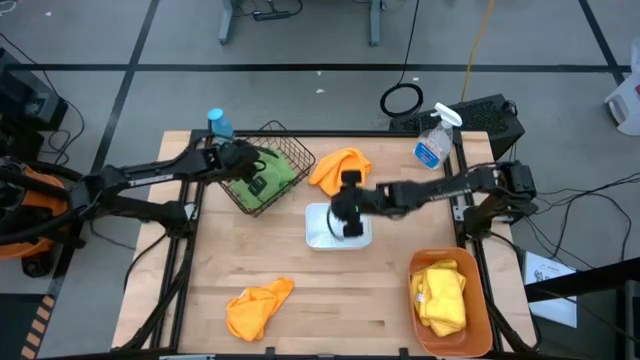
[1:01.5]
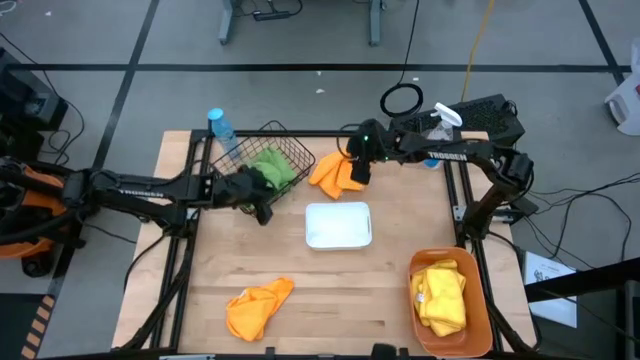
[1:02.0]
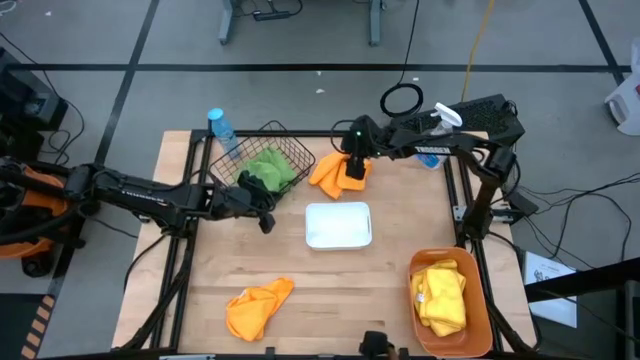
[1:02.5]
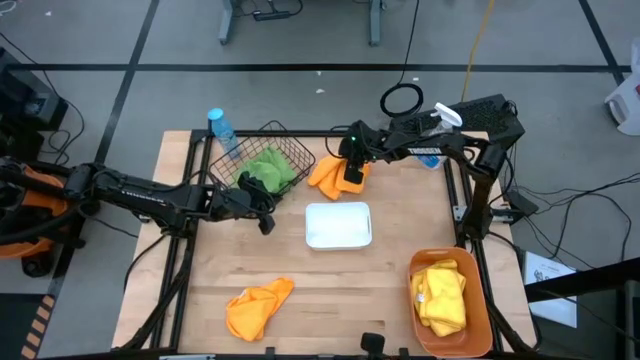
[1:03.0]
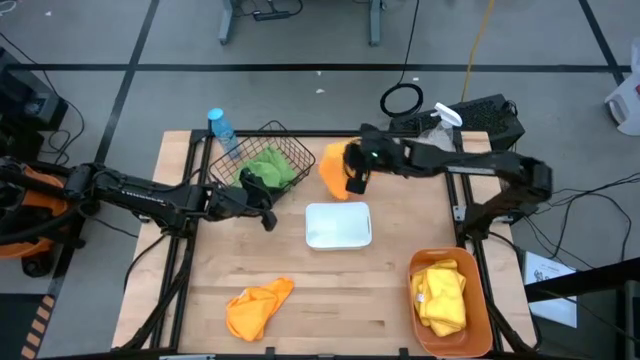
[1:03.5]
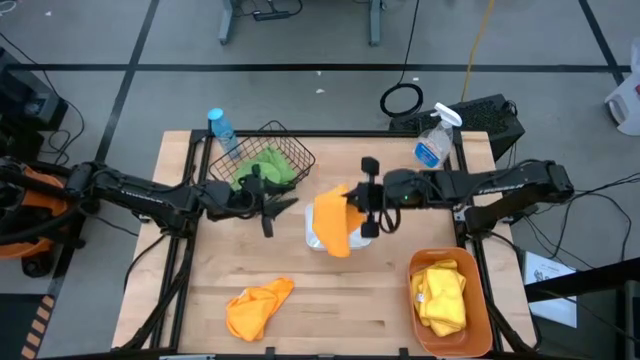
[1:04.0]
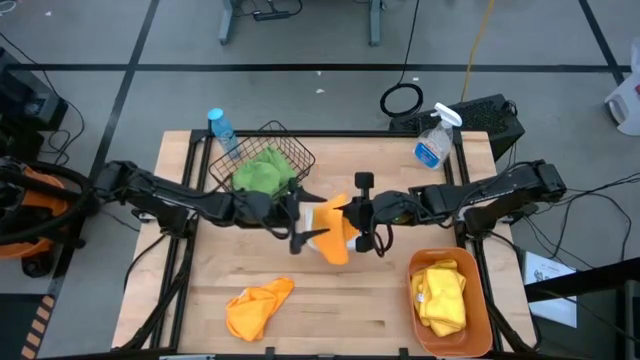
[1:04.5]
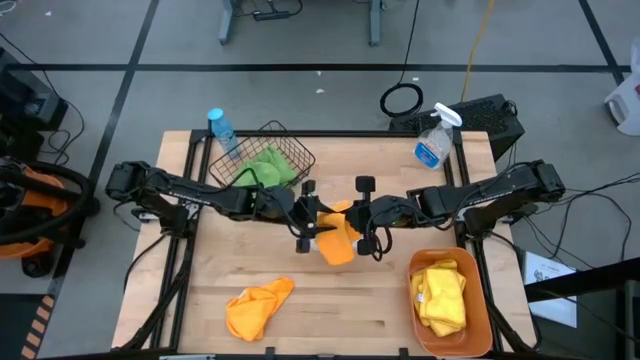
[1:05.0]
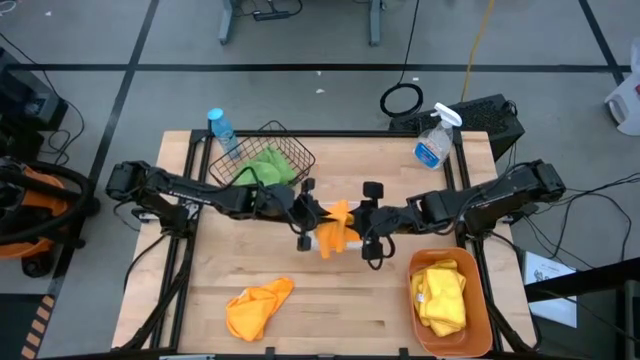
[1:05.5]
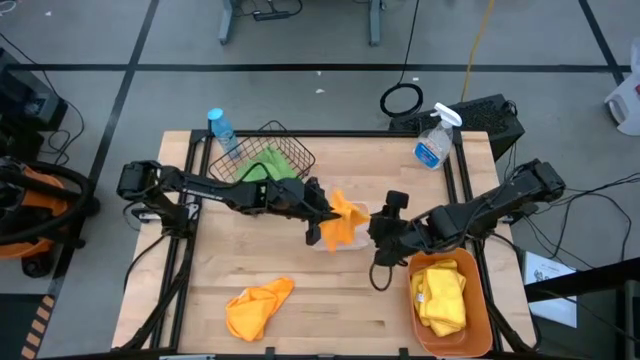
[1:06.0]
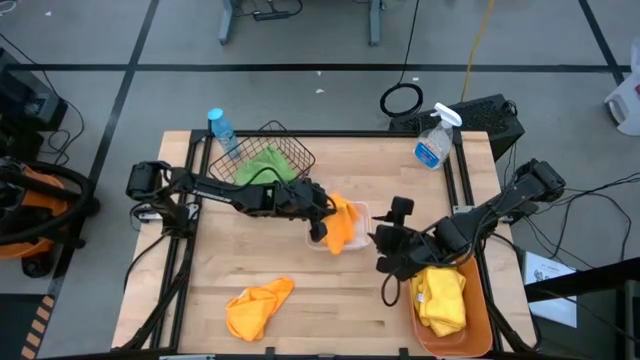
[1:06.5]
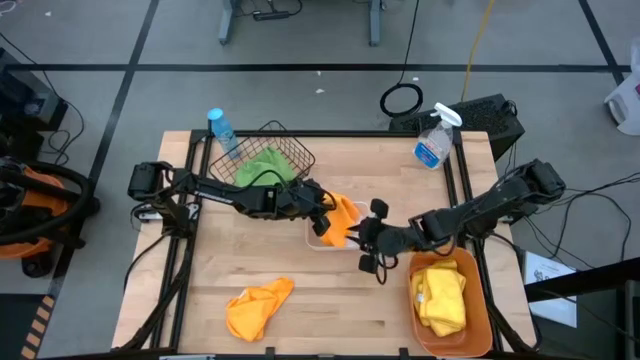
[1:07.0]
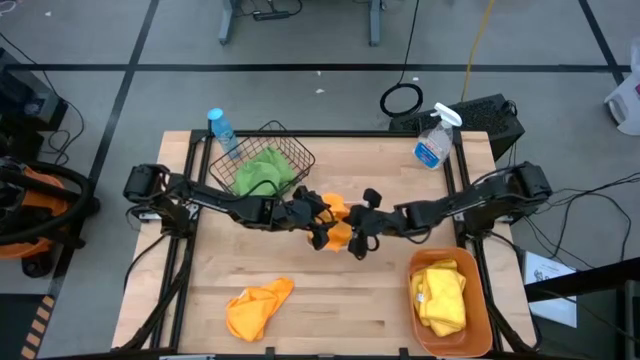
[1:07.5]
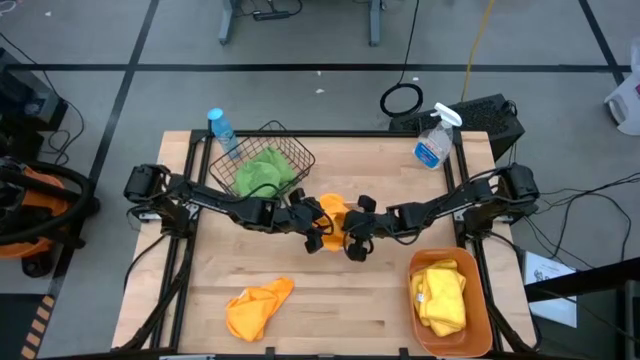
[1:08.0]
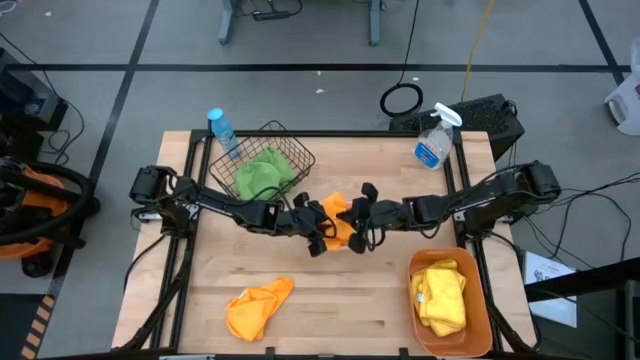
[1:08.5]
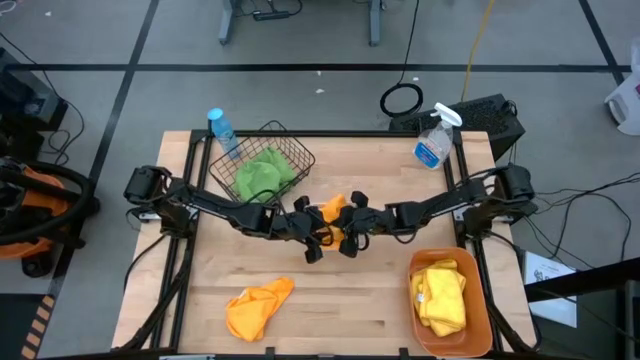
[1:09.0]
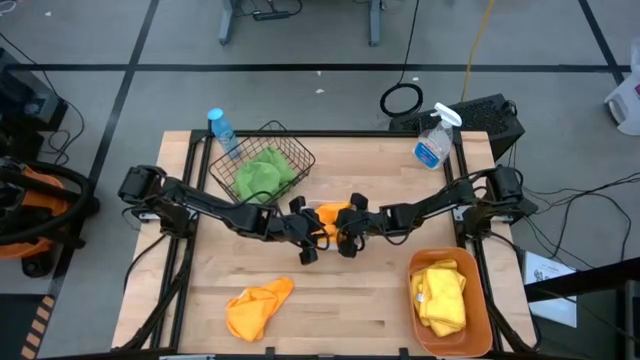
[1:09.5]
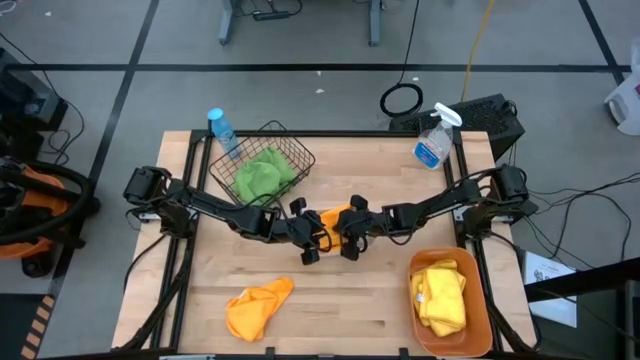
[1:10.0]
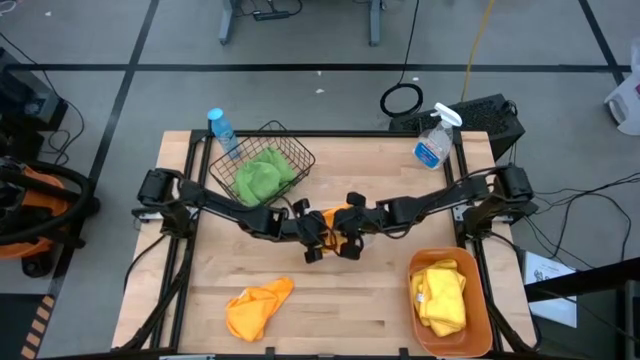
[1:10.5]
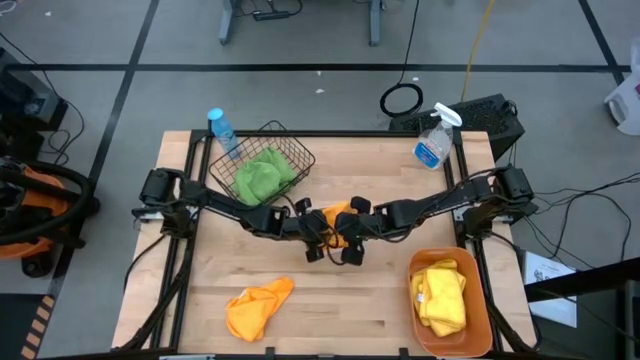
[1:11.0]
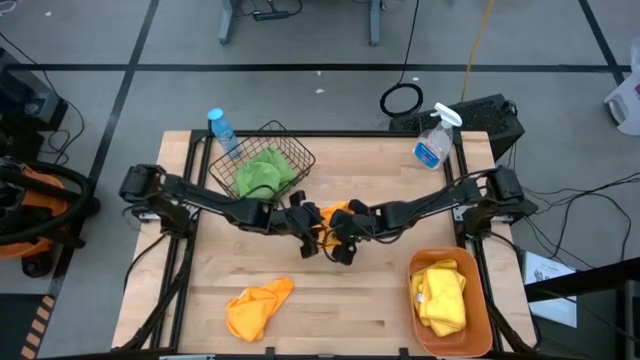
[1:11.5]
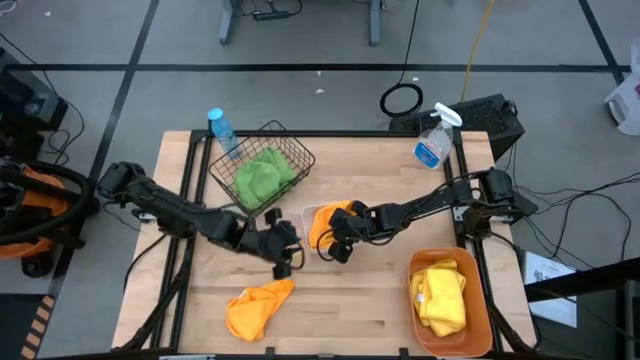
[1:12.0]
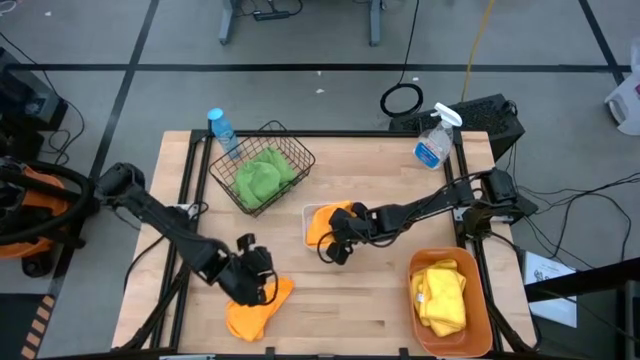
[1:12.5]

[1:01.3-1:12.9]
Task: Sort microfiber towel by color & place in baskets
Put the top orange microfiber towel into the white bin

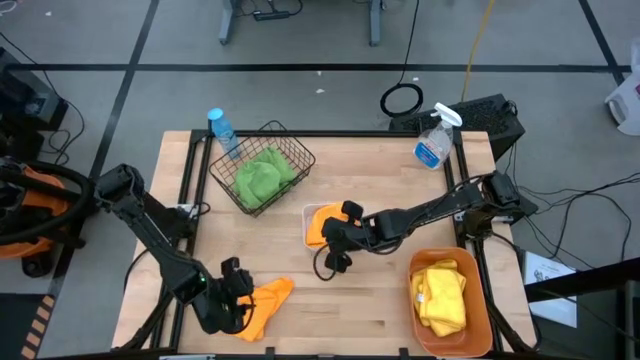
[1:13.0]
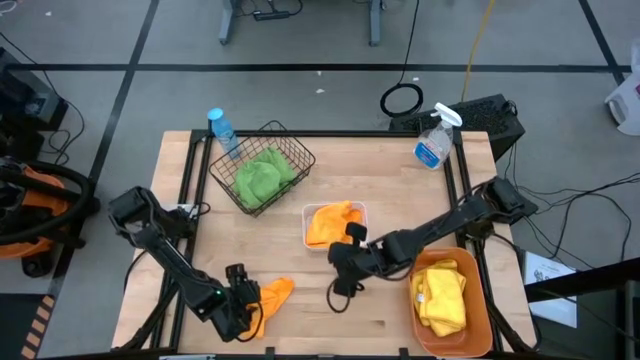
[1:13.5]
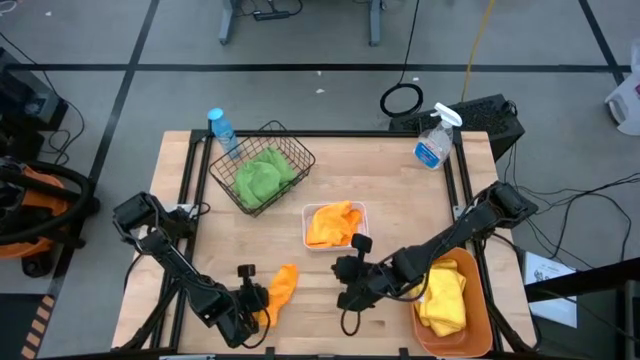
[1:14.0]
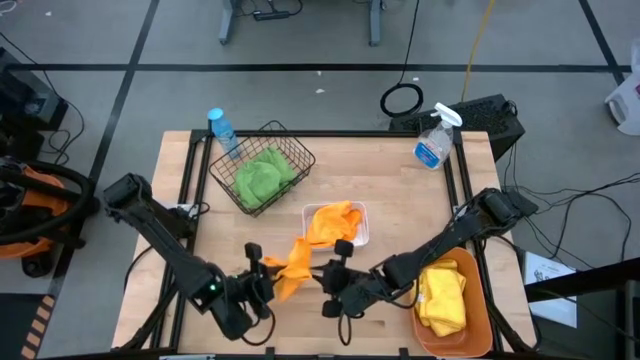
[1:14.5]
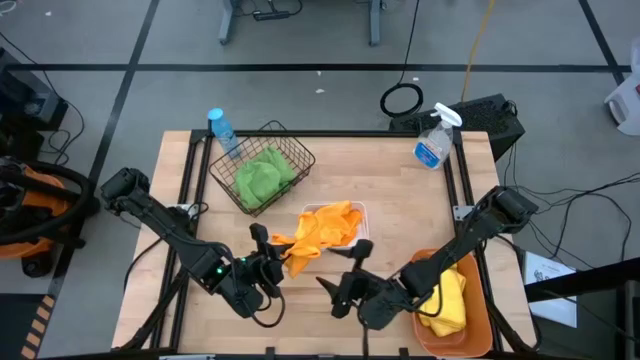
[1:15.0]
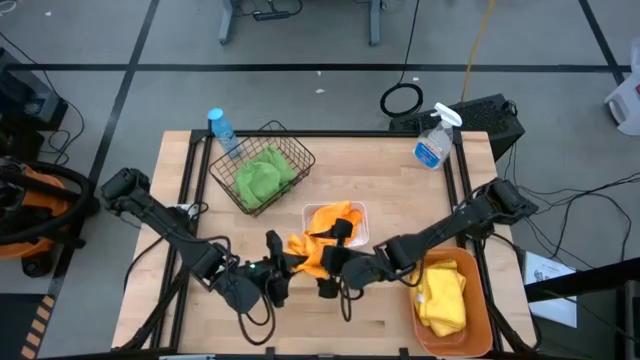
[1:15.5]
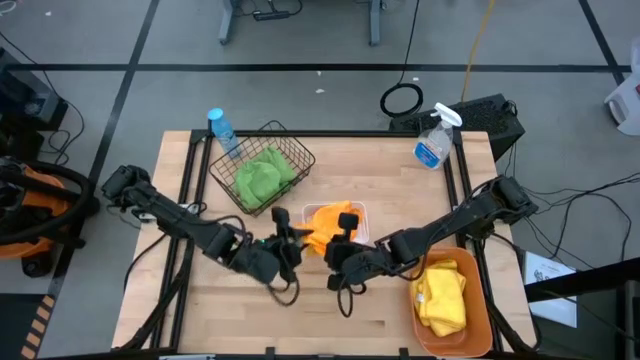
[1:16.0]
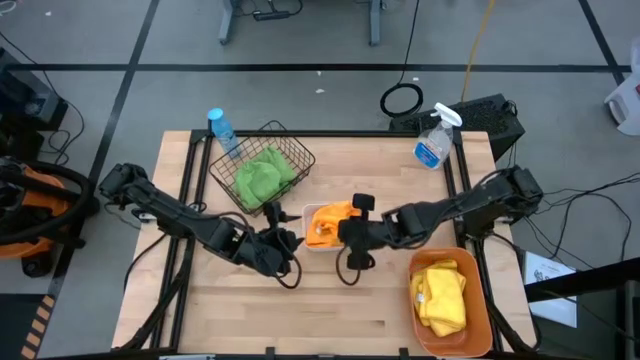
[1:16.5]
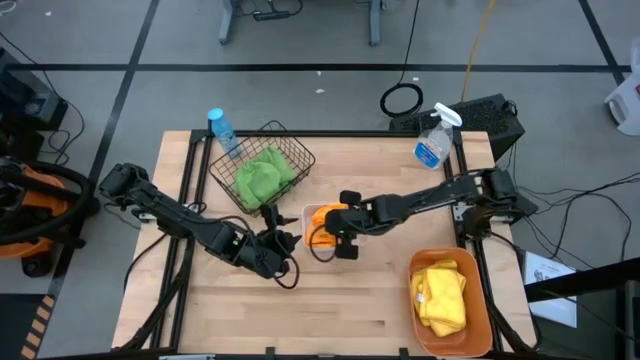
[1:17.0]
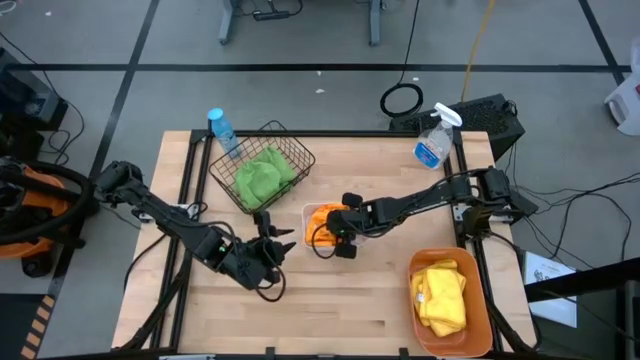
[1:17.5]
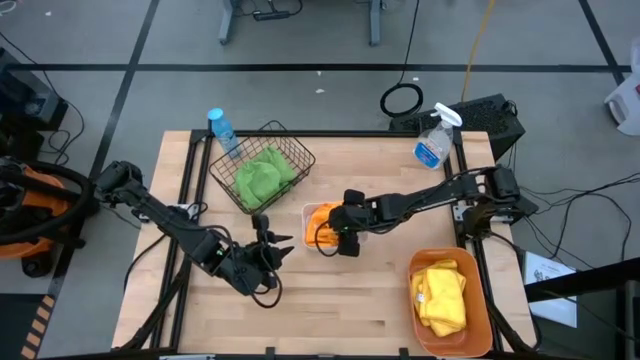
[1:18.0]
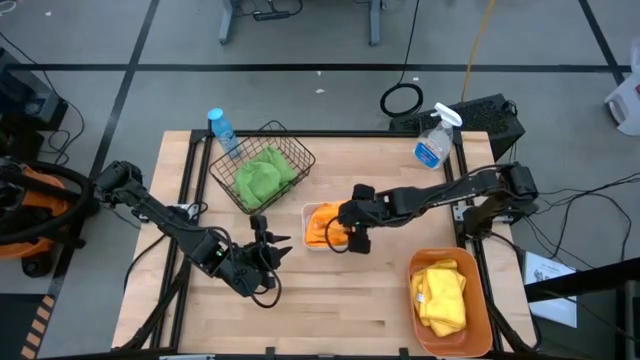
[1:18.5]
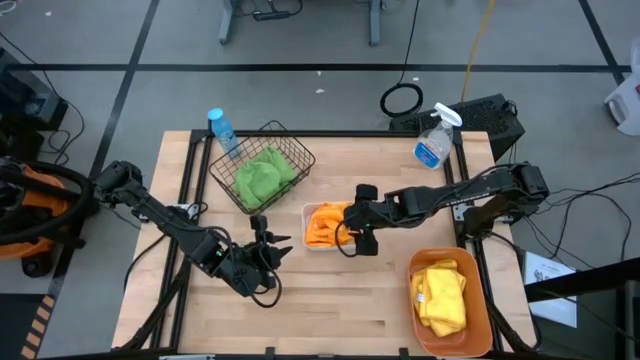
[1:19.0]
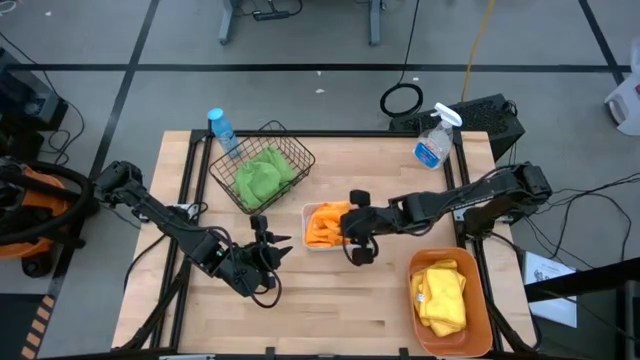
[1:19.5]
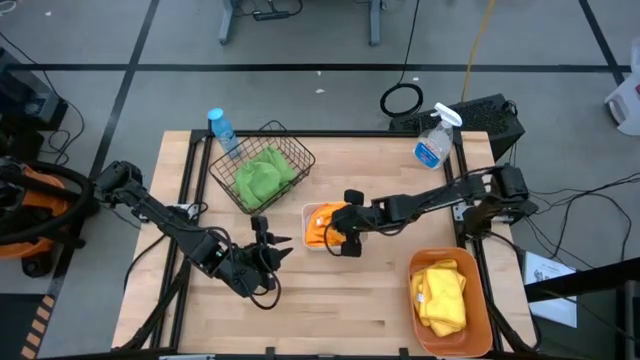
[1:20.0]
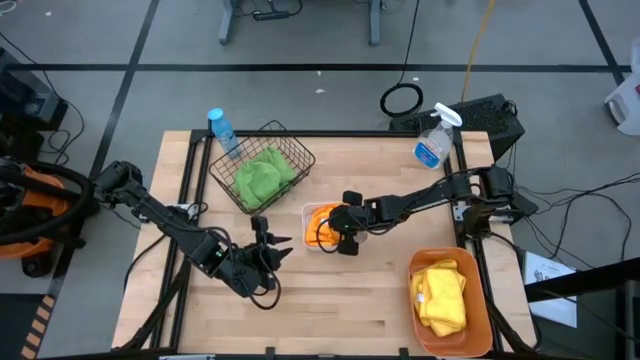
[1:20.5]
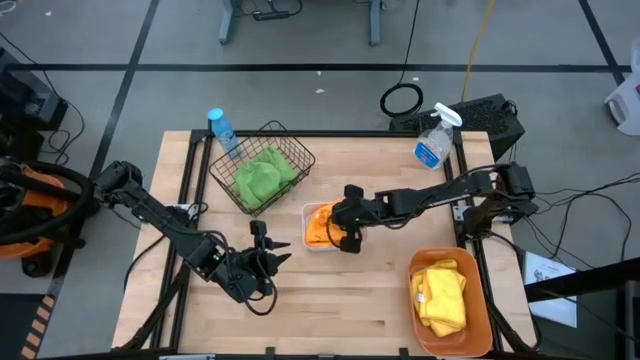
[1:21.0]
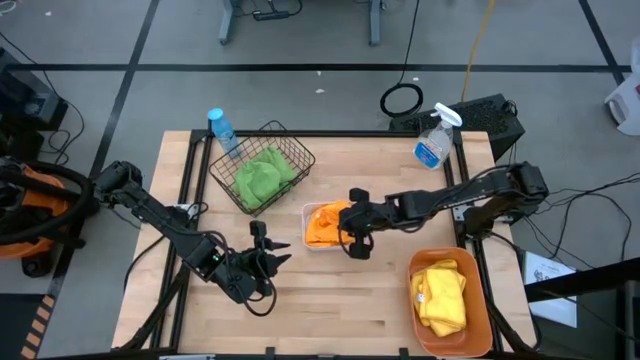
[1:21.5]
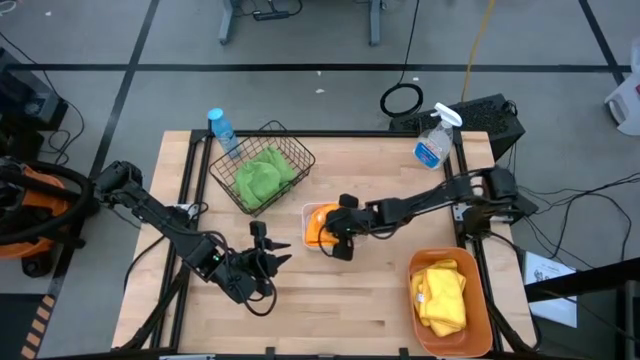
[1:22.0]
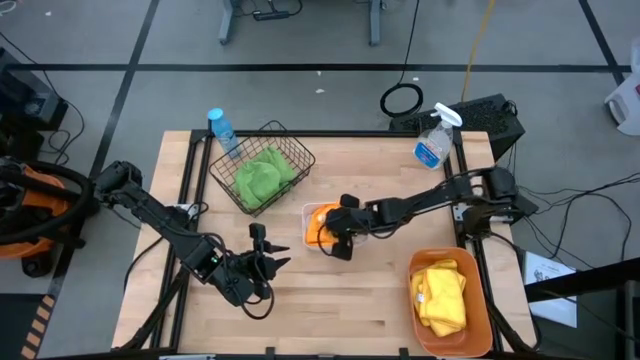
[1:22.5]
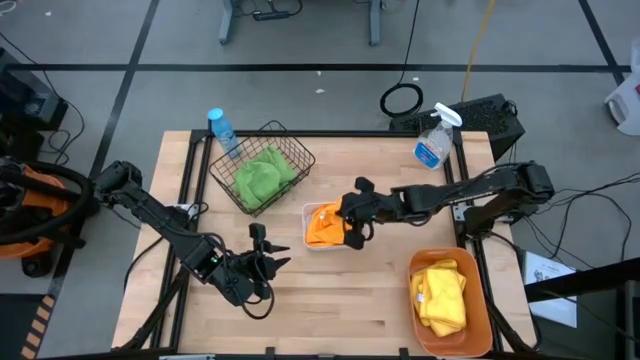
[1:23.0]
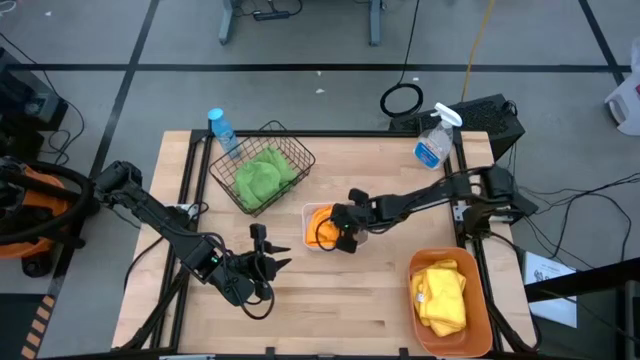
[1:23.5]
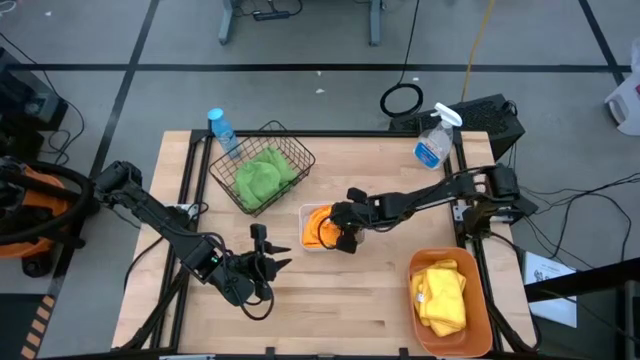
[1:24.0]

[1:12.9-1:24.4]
Put the orange microfiber towel into the white bin
